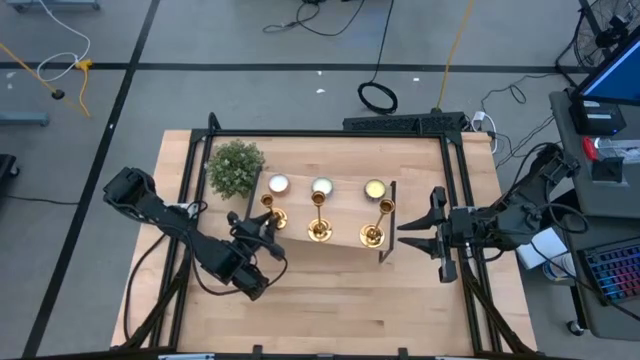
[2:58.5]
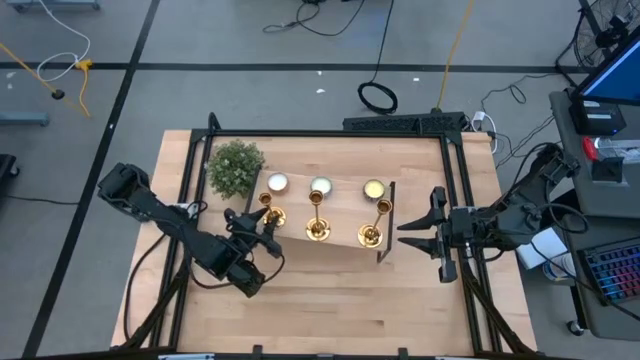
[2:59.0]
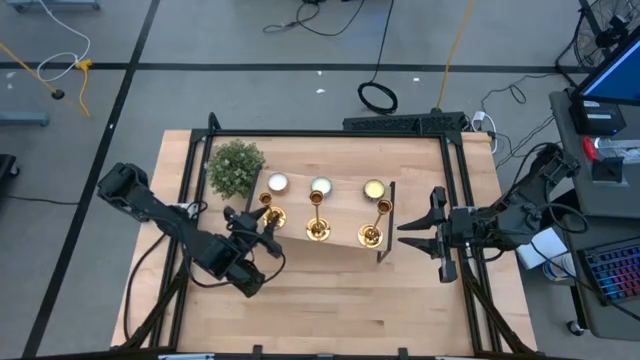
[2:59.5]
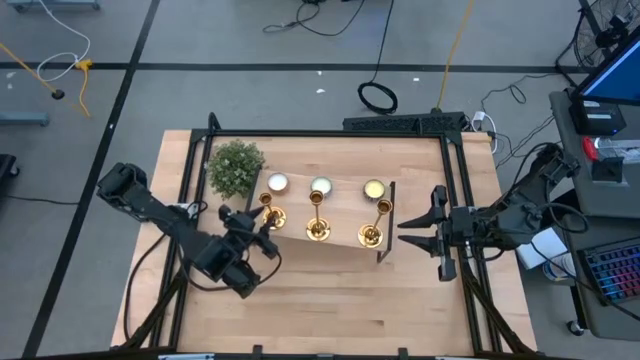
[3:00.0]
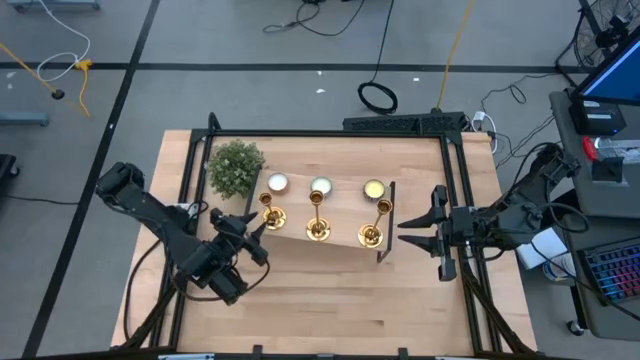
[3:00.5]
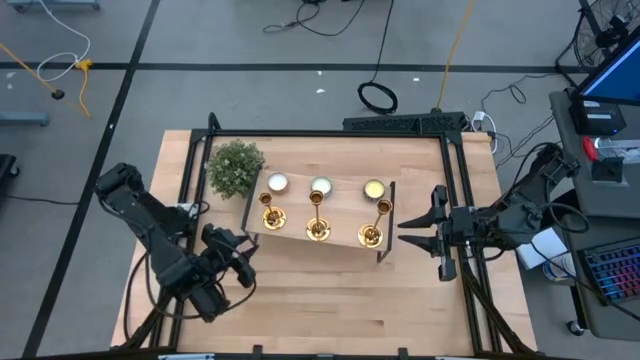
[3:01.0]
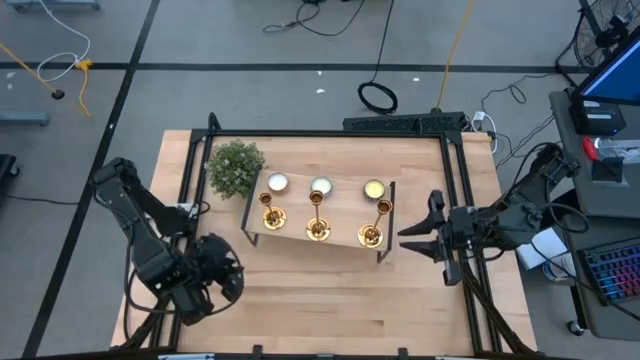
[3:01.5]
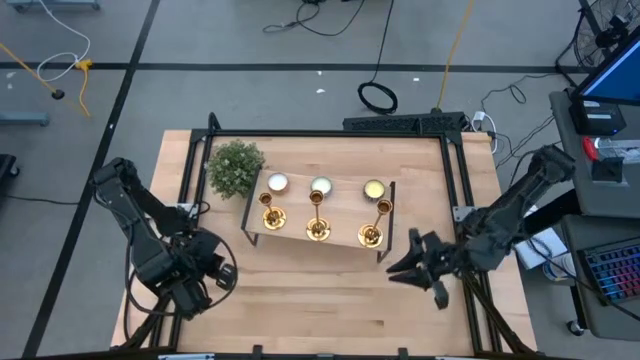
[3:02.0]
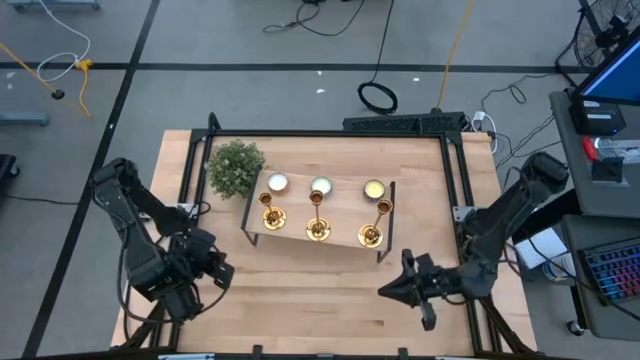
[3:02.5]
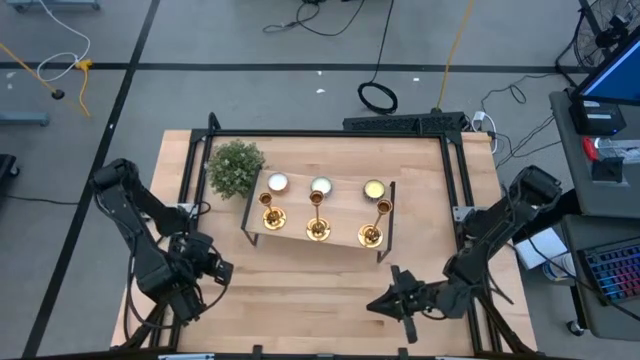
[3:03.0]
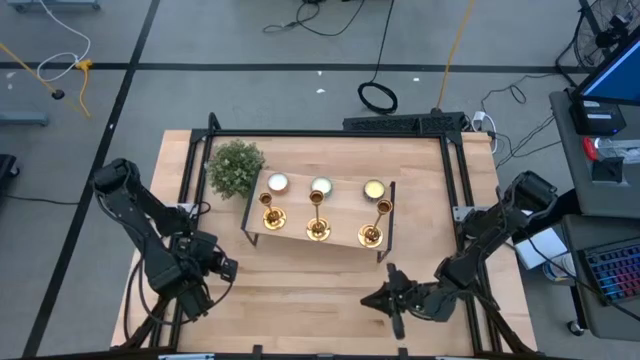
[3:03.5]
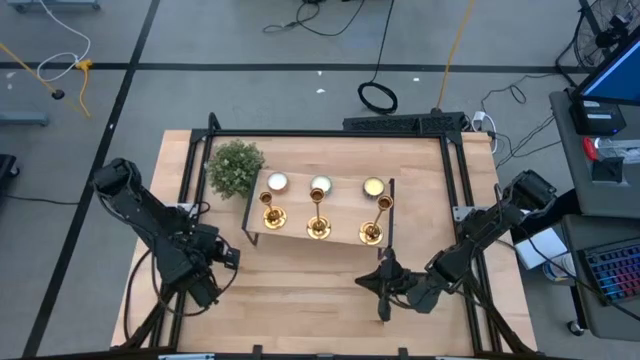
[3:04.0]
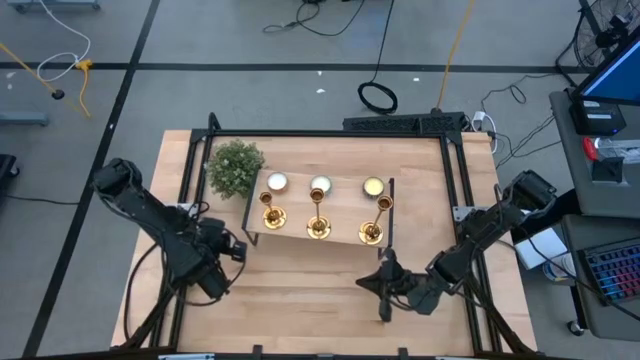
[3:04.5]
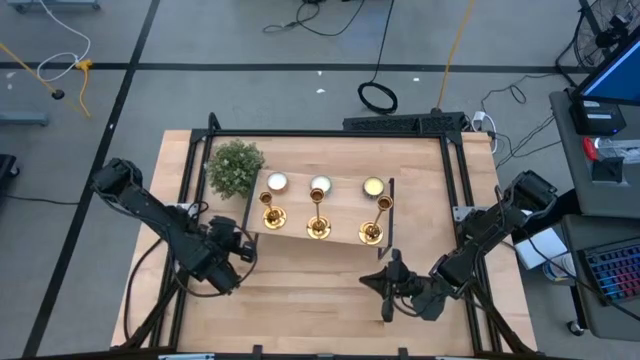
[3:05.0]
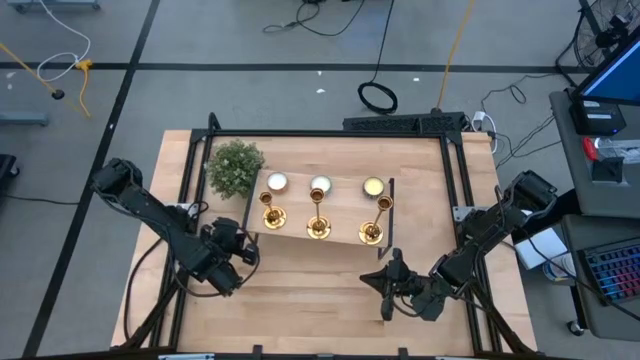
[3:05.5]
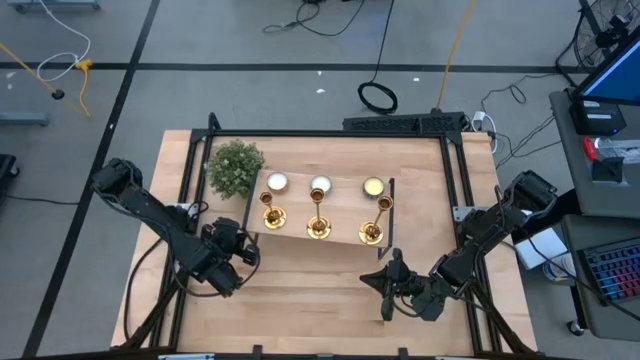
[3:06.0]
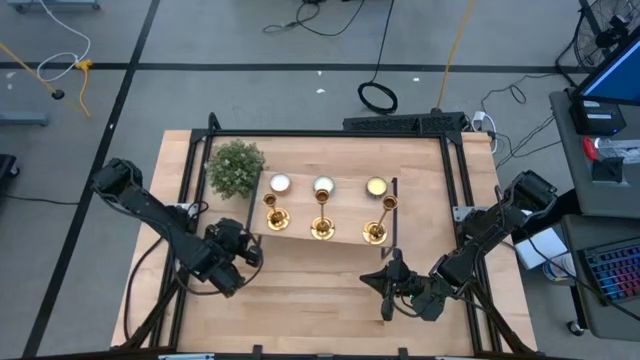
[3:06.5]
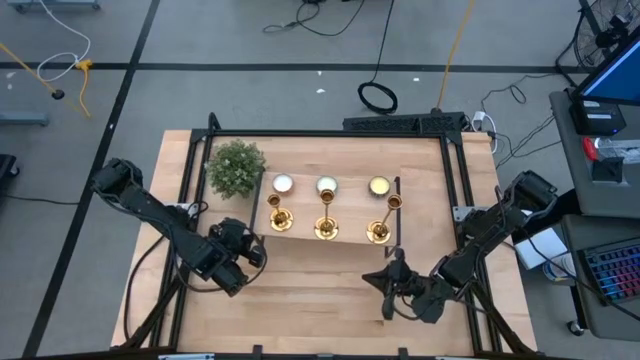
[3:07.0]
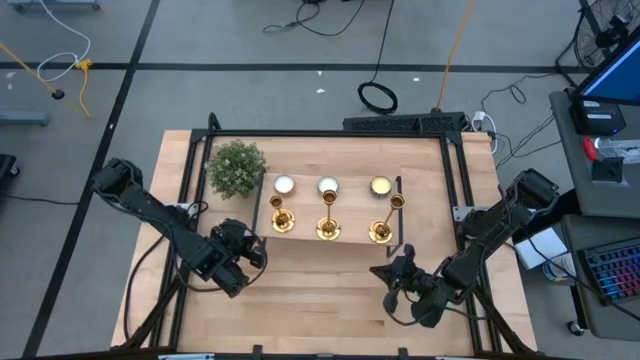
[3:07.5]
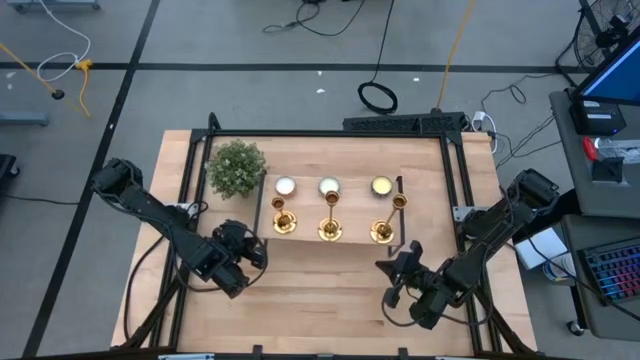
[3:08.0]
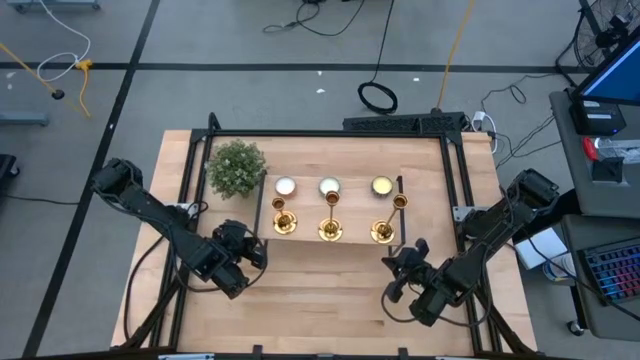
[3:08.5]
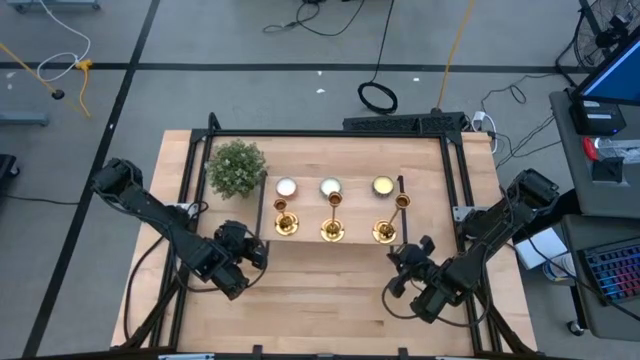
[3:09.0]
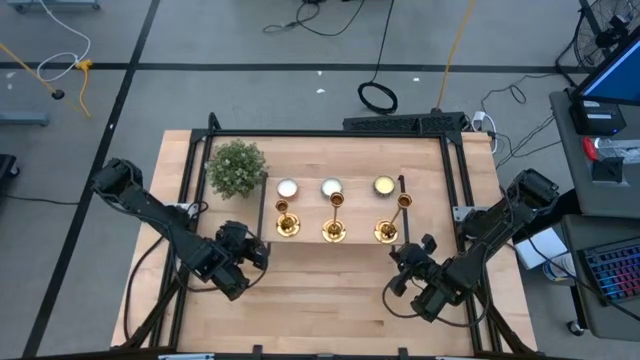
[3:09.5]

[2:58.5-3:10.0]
Task: Pick & Place candle stick holders
Adjust the shelf
